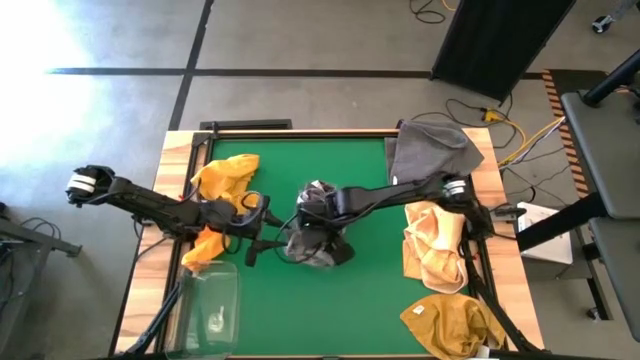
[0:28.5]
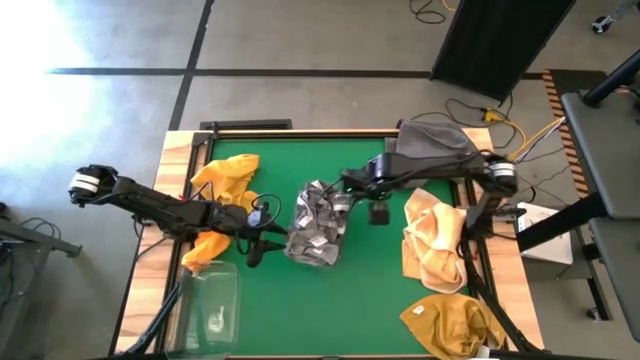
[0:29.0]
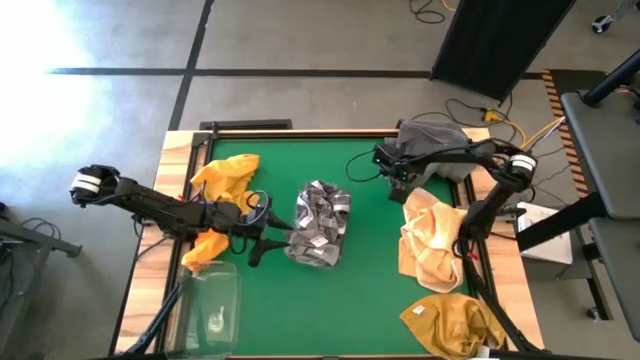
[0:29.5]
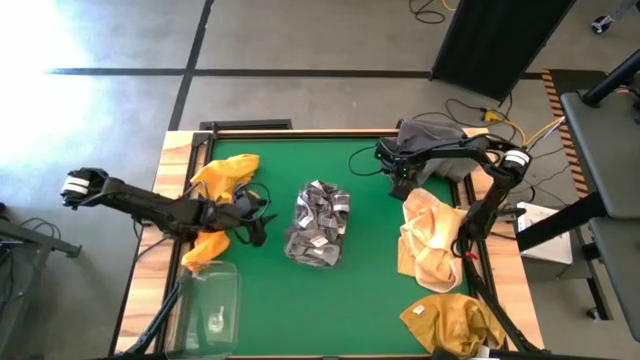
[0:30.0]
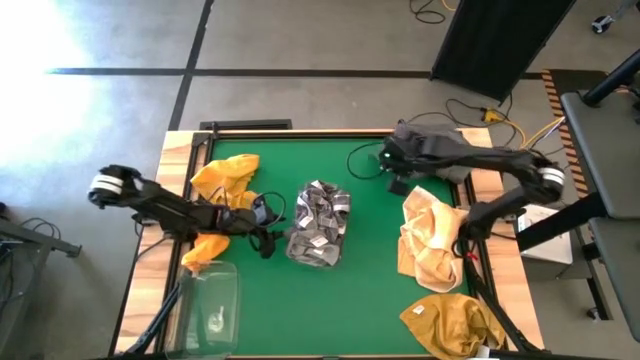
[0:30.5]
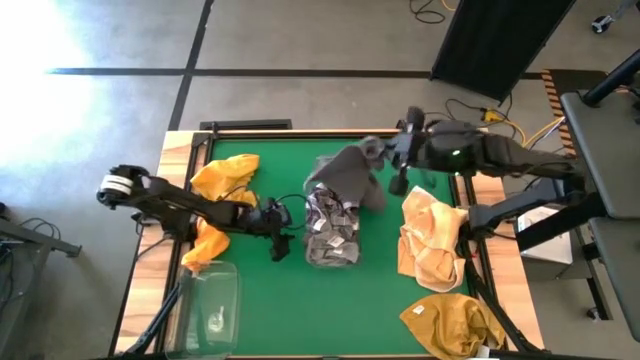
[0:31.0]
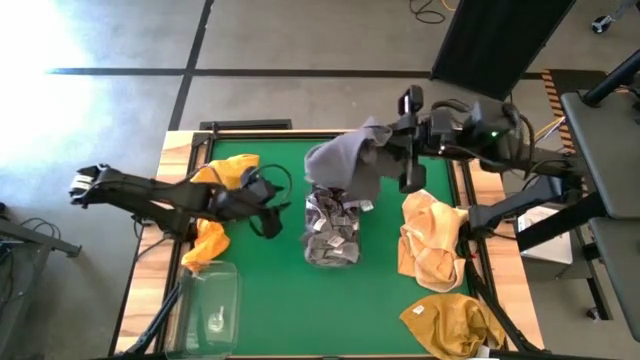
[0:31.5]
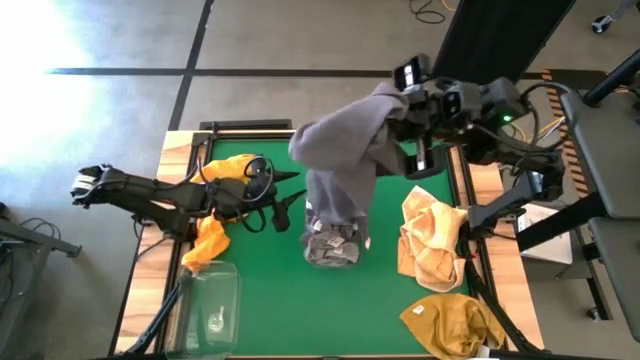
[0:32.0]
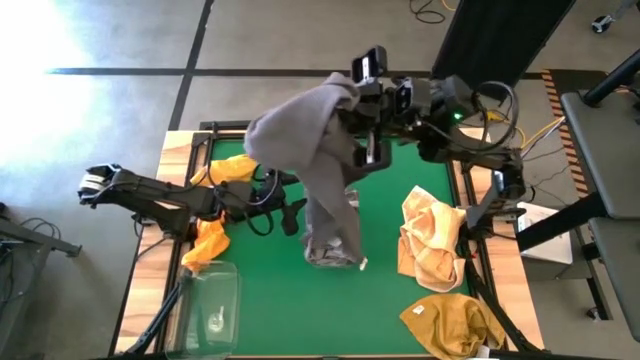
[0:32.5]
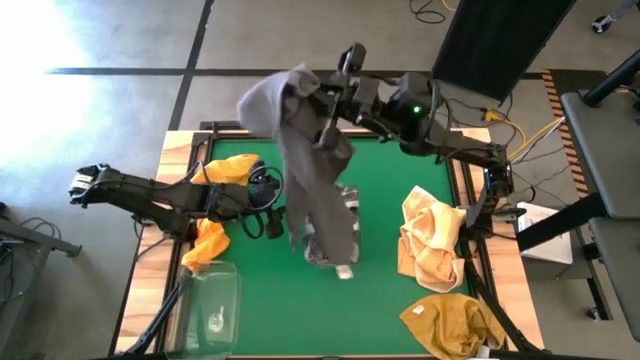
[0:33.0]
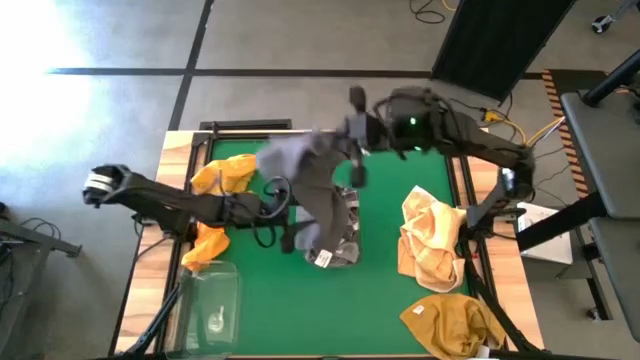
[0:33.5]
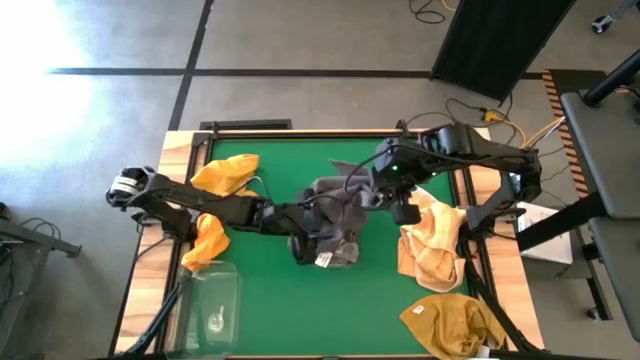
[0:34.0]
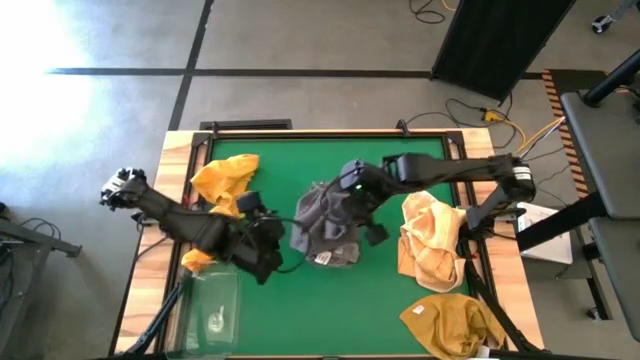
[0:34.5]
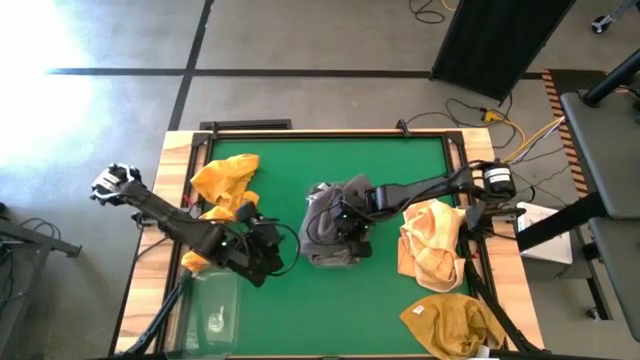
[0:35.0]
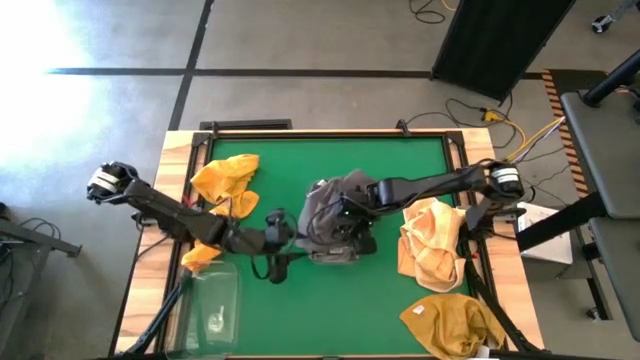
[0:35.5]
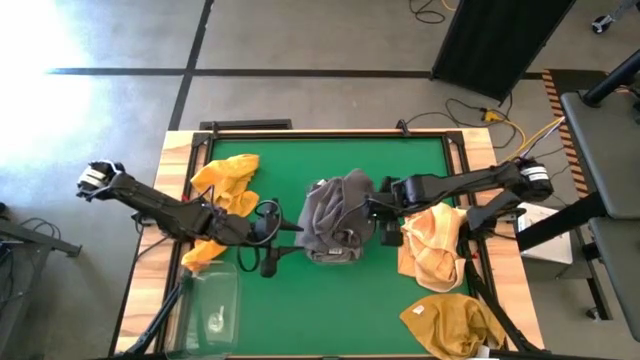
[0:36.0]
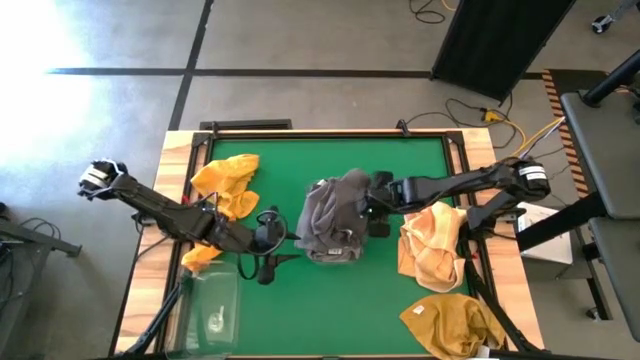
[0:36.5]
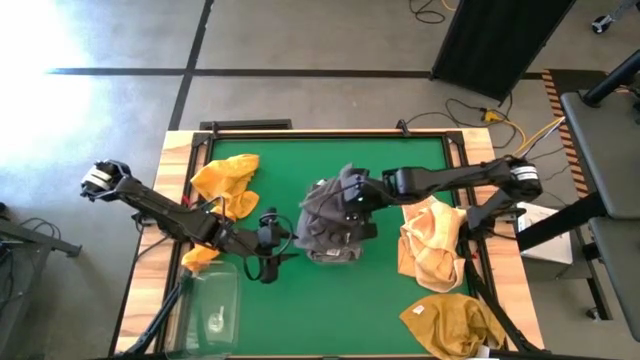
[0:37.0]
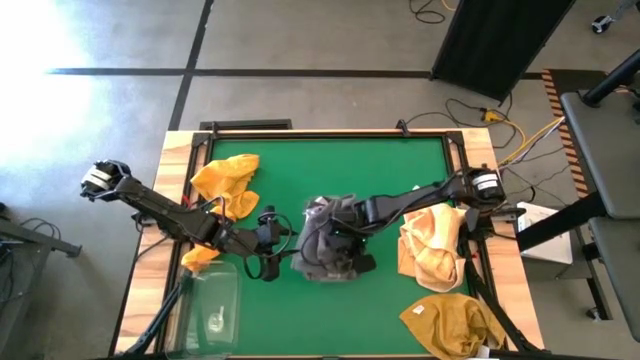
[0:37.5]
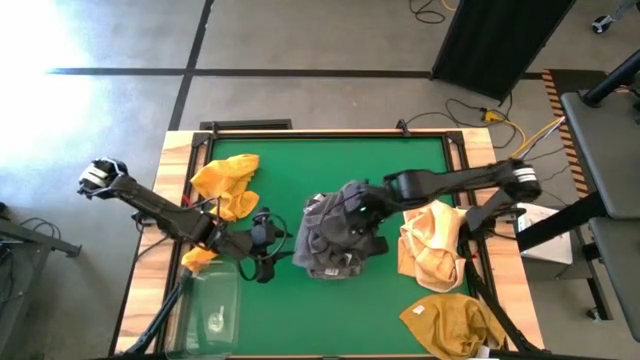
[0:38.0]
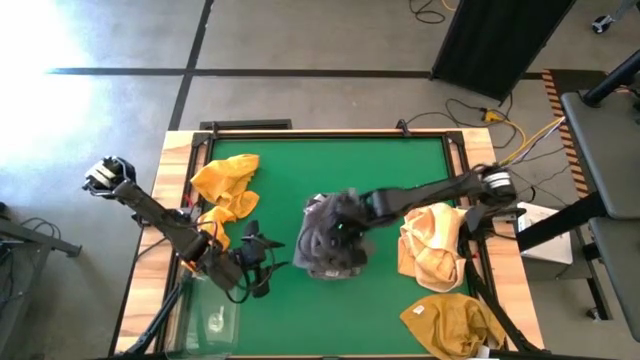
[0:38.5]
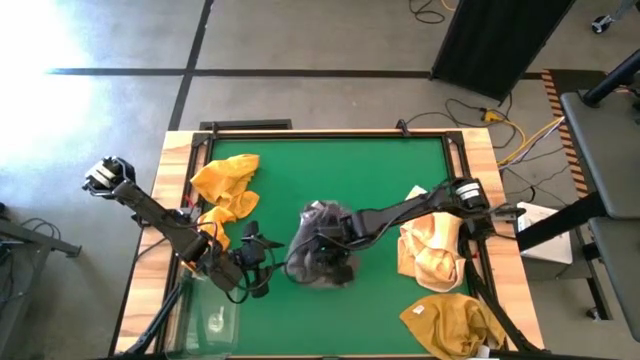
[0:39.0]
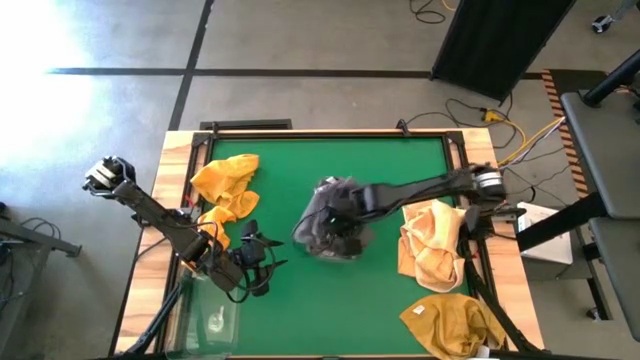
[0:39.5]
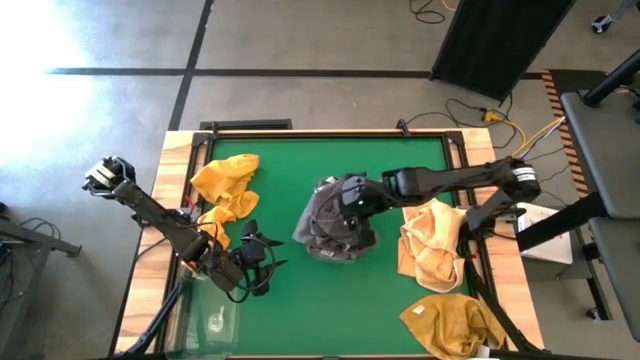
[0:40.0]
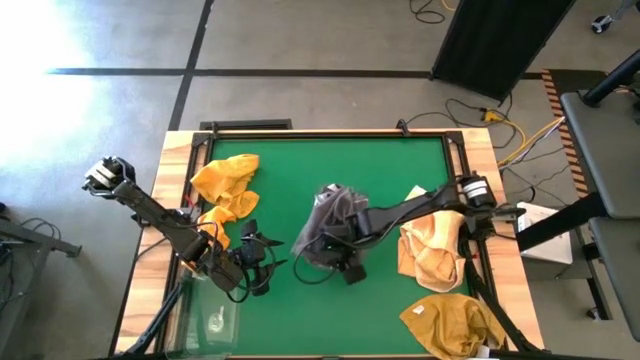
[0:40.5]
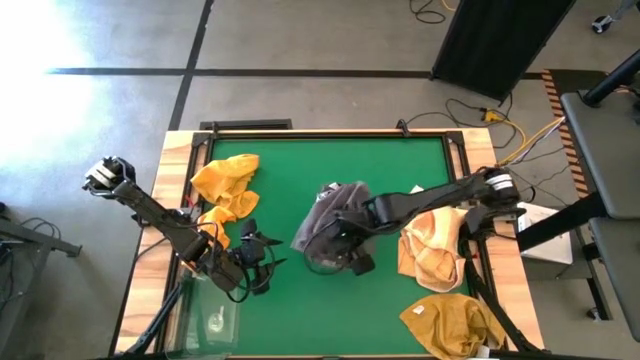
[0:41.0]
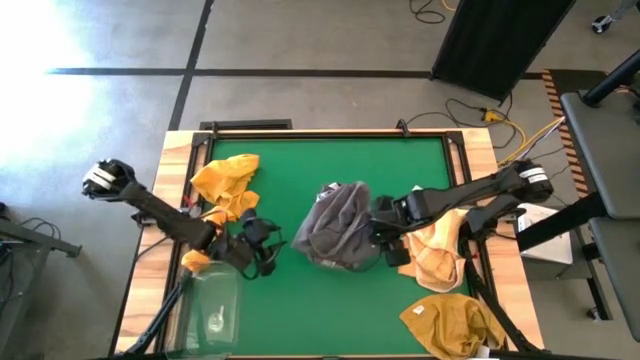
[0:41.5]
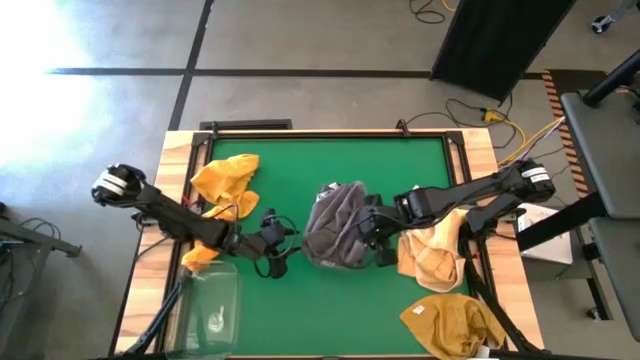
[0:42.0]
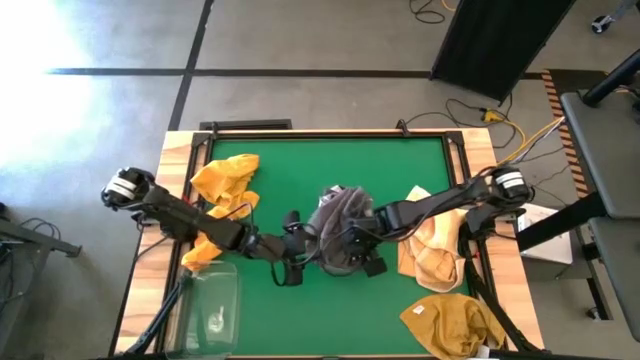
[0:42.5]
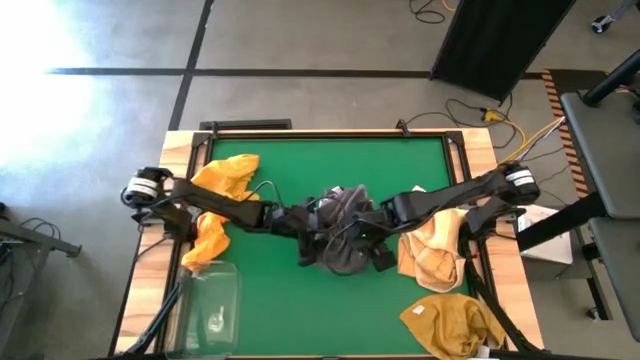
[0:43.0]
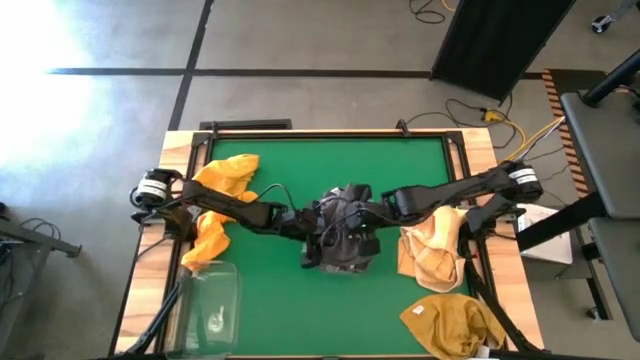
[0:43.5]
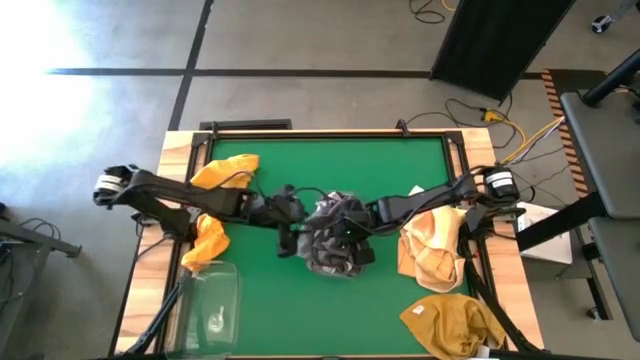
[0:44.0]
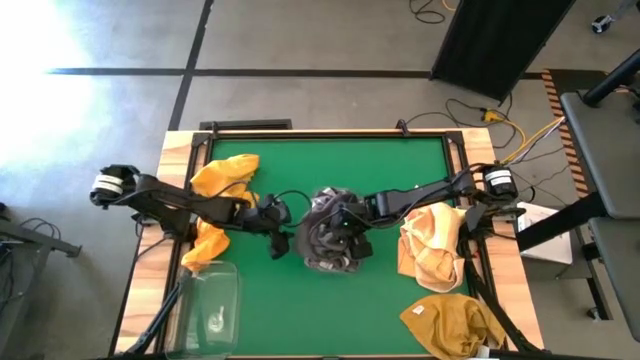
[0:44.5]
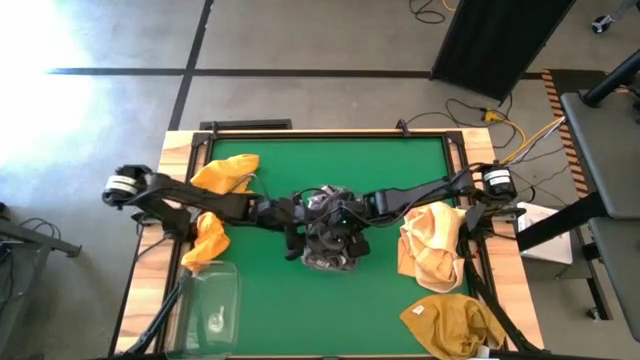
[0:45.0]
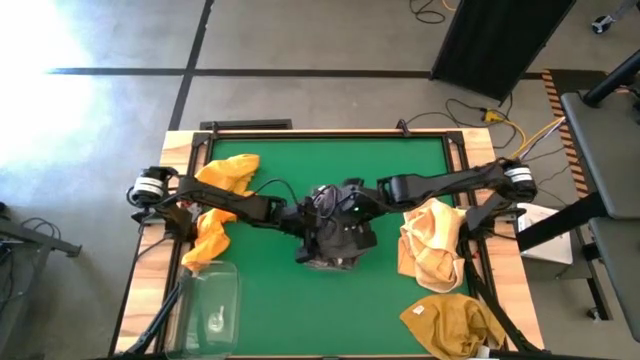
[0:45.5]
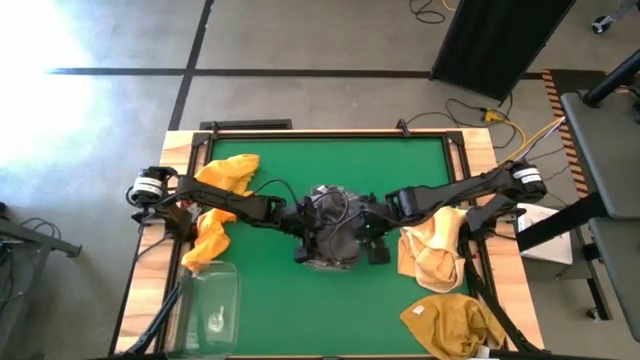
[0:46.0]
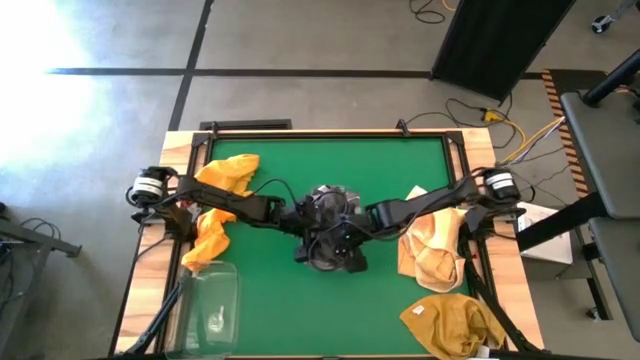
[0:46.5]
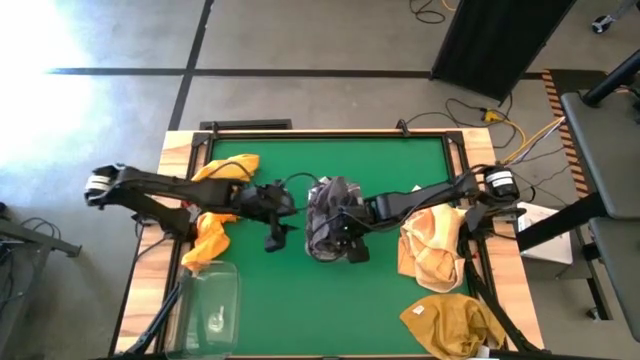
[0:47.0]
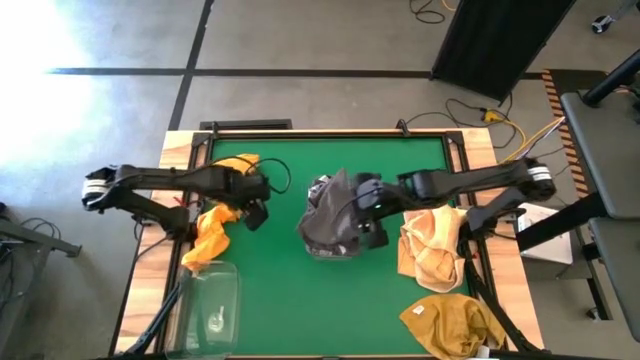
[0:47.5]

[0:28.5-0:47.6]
Task: Sort towels by color in basket
Put the gray towel into the top transparent bin

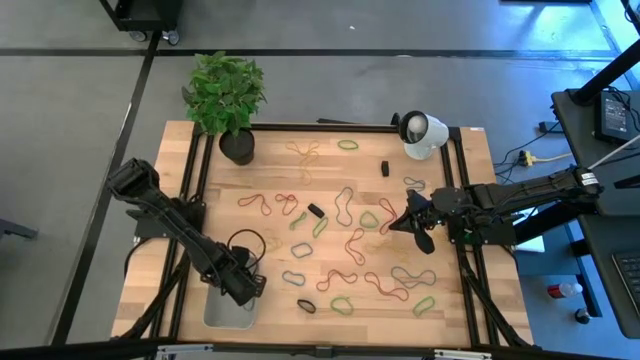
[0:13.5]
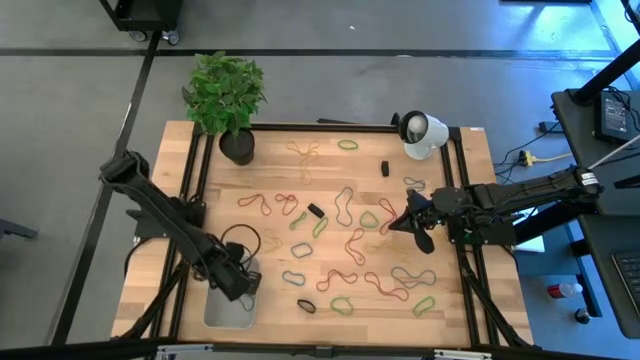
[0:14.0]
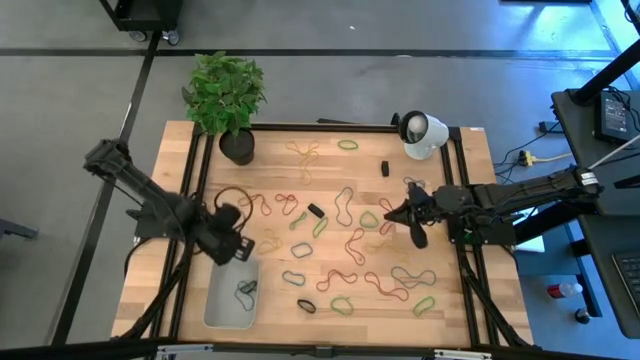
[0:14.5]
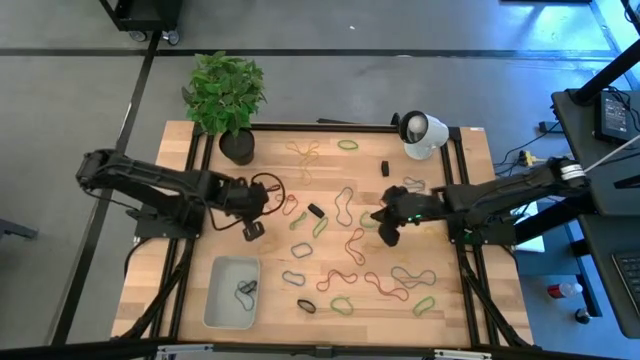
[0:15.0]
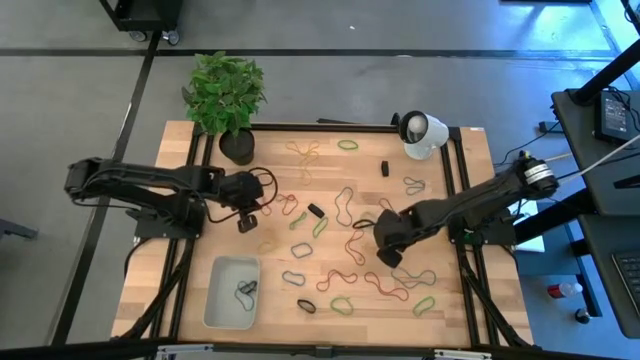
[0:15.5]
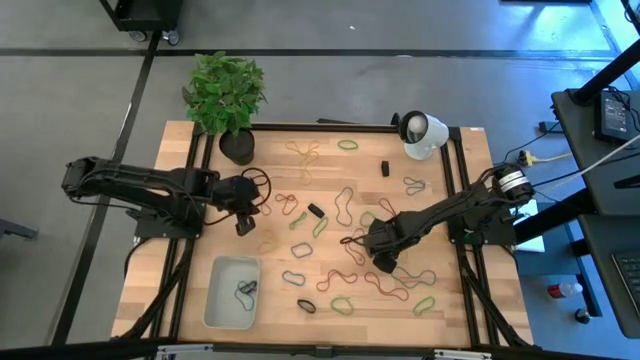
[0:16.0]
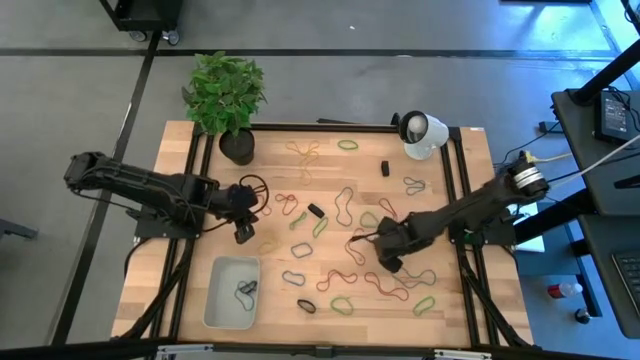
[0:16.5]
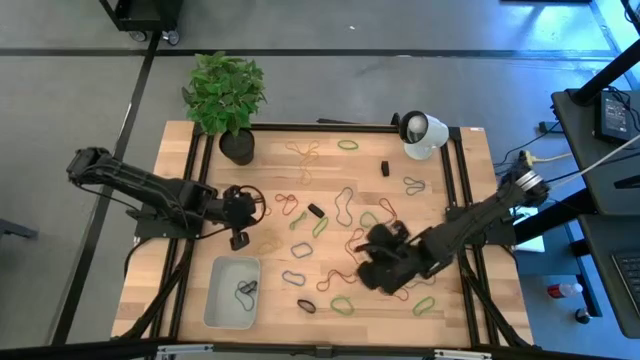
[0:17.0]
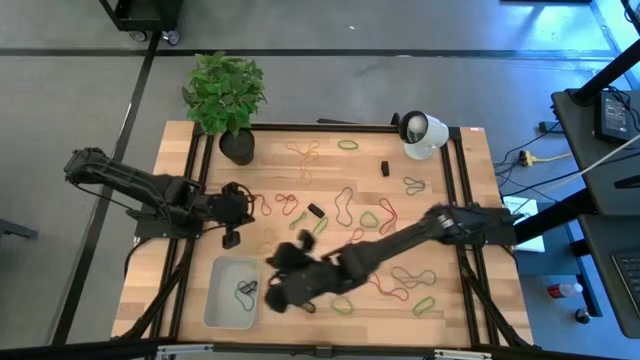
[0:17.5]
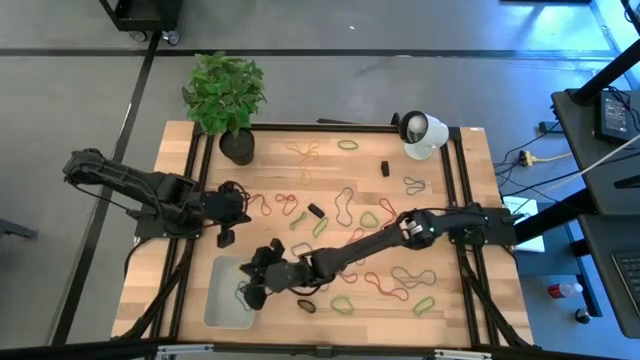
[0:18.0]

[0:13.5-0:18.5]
Task: Pick and place rubber bands into bin
Put the yellow rubber band into the bin
